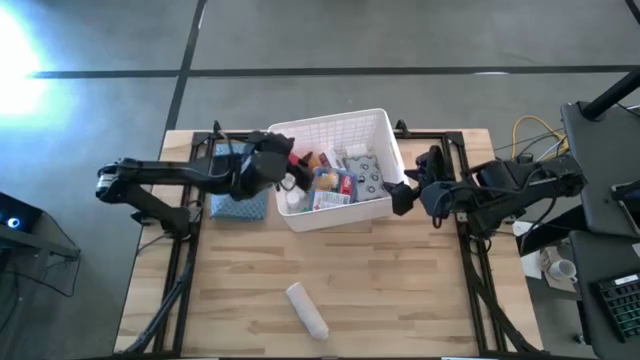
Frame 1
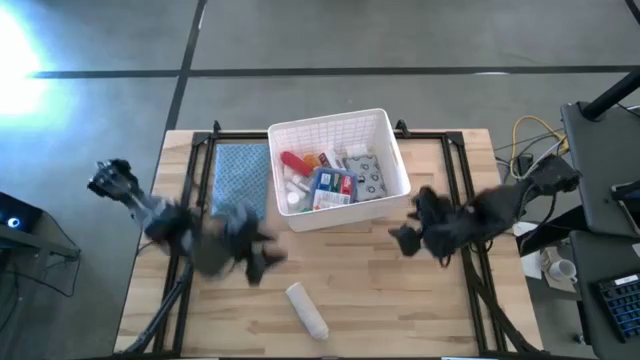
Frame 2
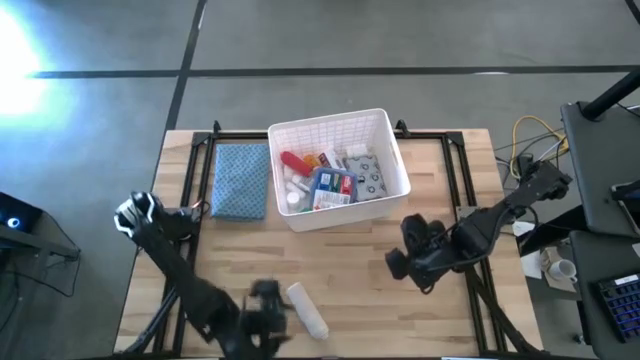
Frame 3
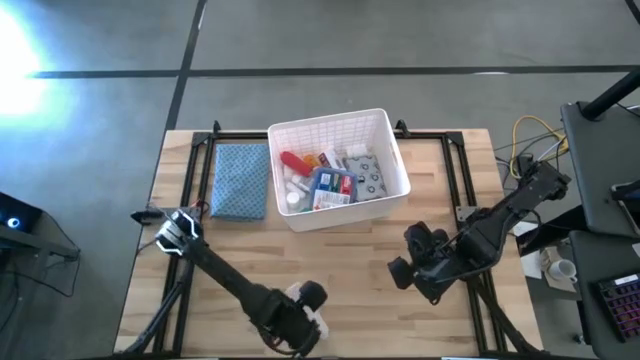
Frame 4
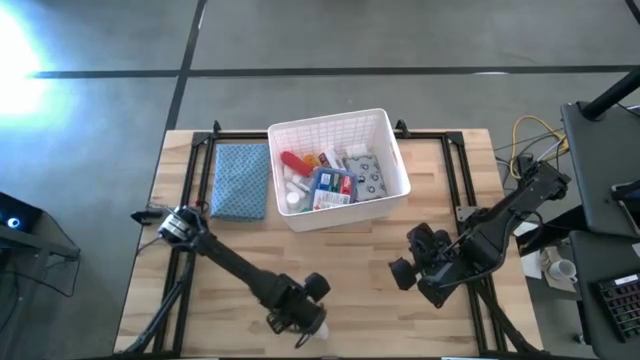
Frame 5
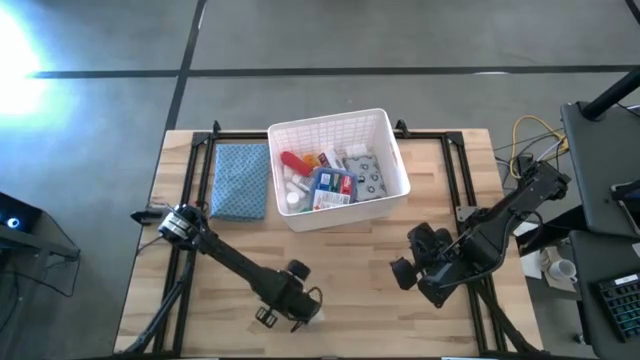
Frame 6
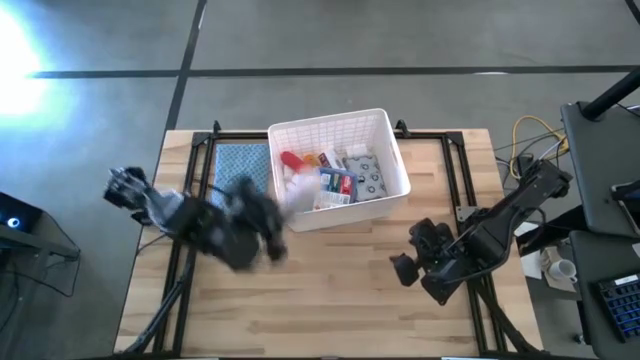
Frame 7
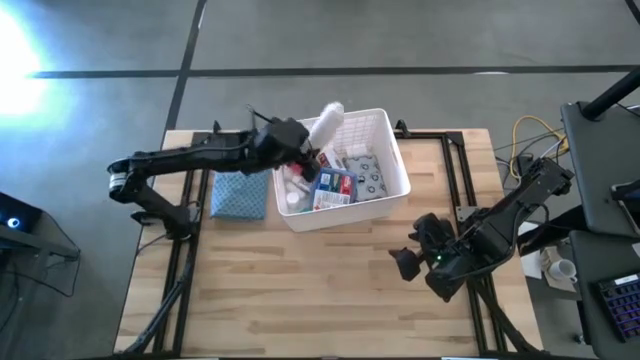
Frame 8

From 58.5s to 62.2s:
Task: Pick & place medical supplies in basket/bin
Put the white bandage into the white bin

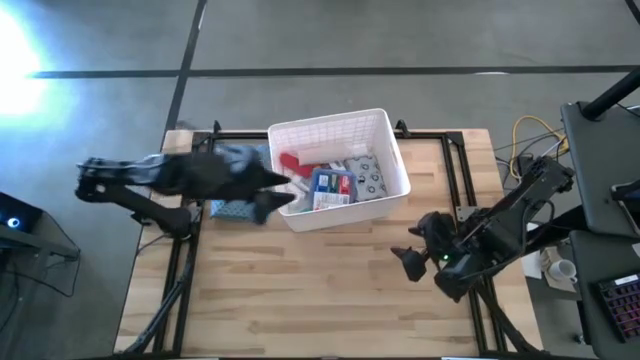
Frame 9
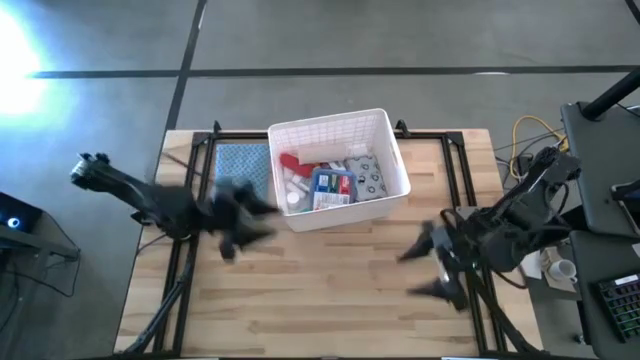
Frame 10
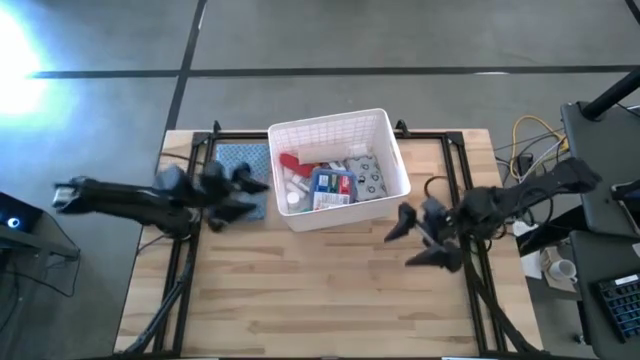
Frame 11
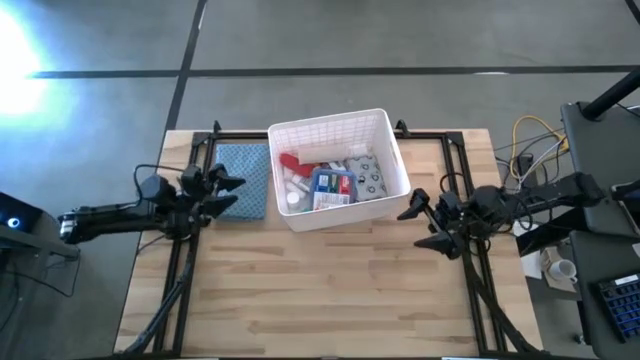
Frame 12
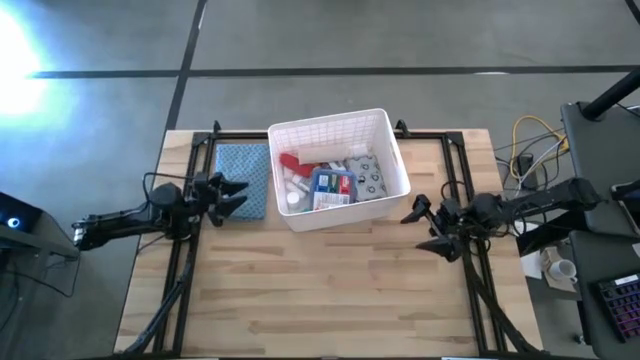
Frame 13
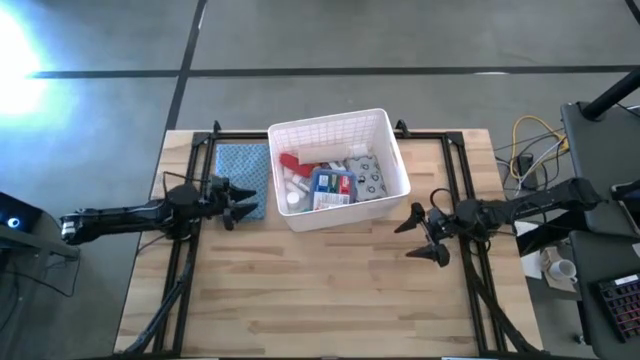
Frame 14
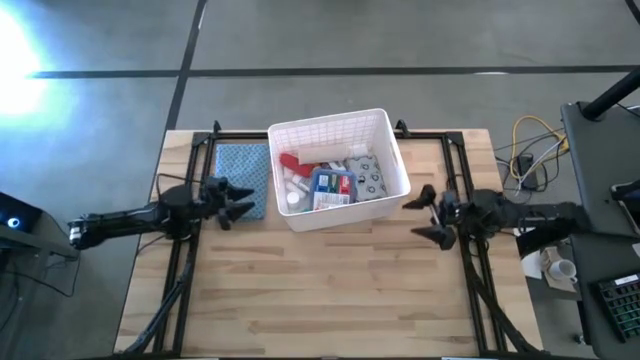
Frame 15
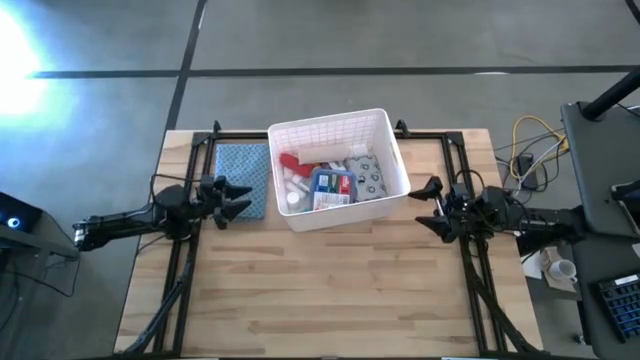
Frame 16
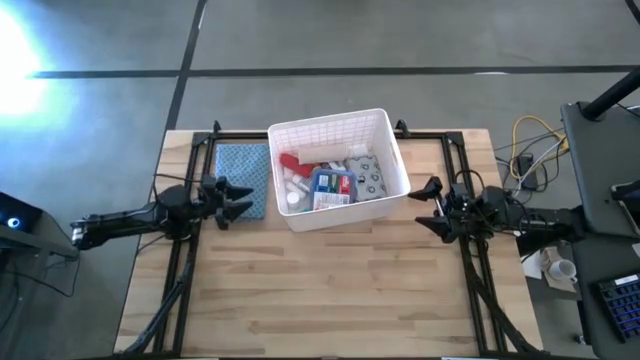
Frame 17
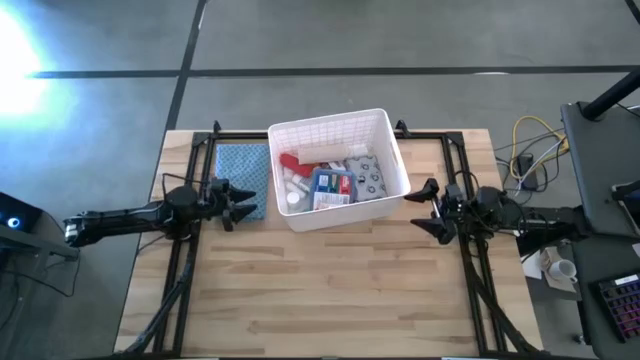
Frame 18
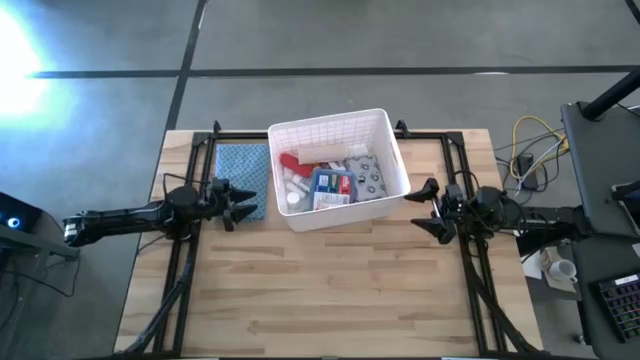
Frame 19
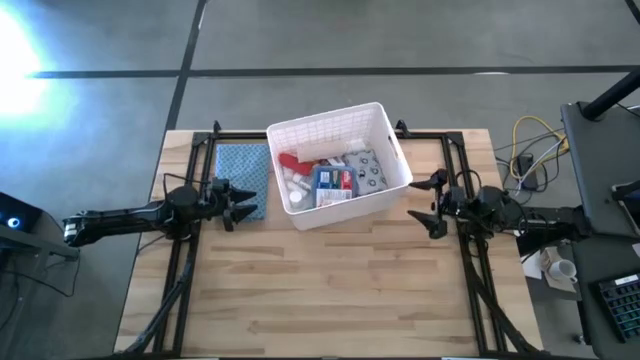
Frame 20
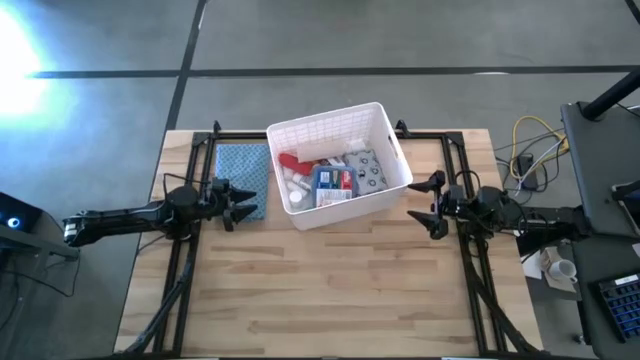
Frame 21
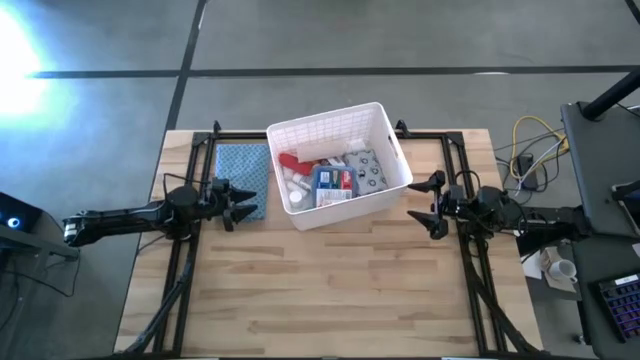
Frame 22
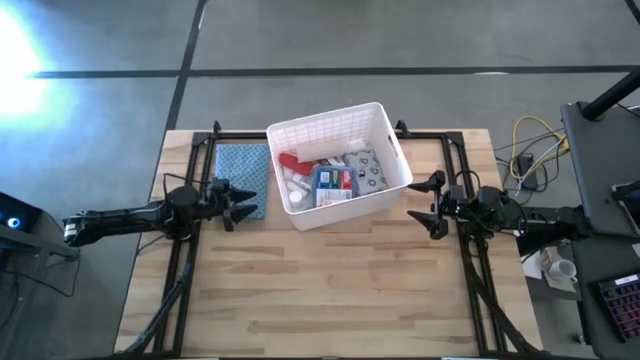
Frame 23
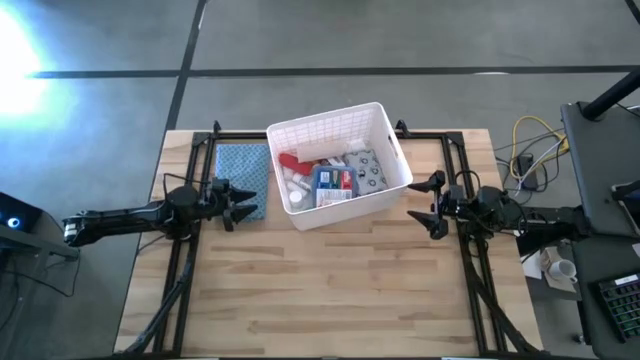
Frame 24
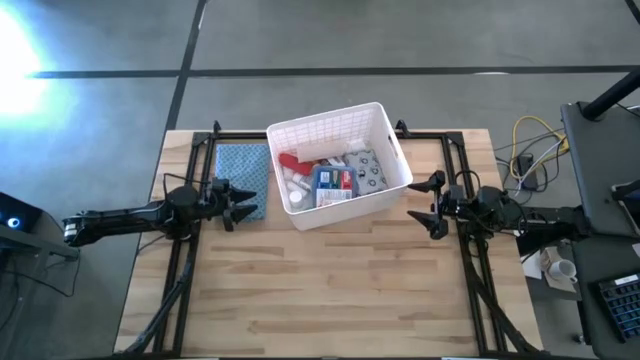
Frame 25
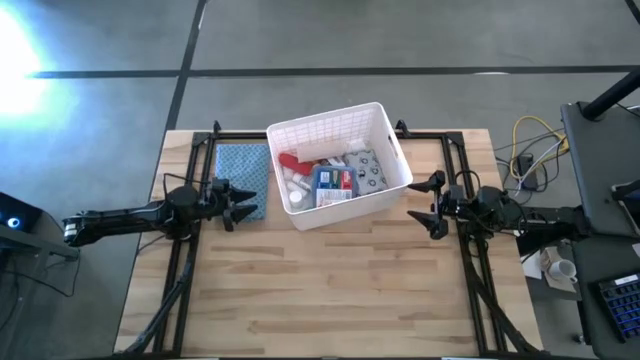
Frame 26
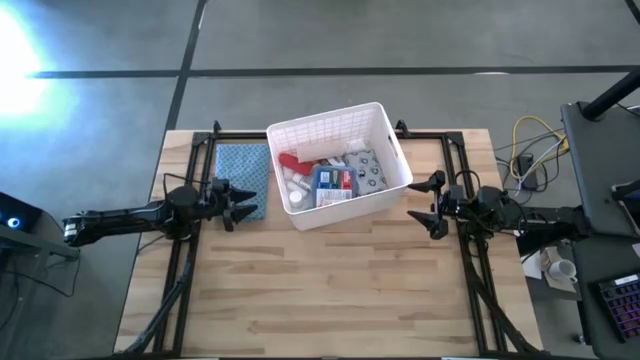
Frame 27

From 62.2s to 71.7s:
Return to Home Position

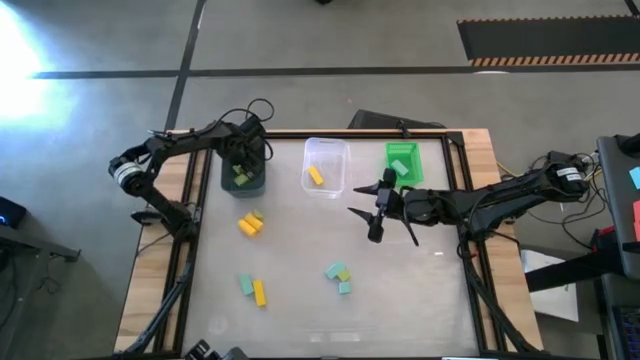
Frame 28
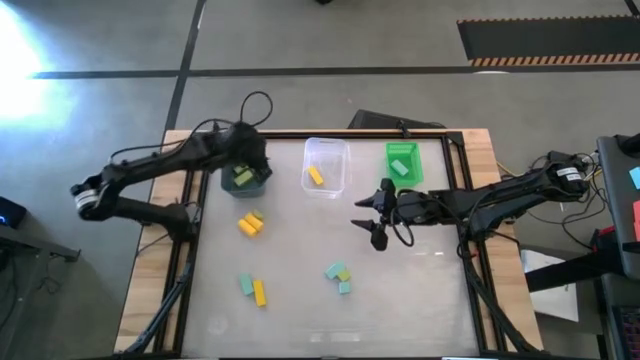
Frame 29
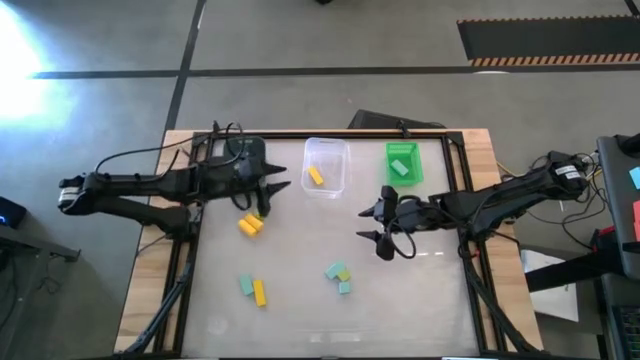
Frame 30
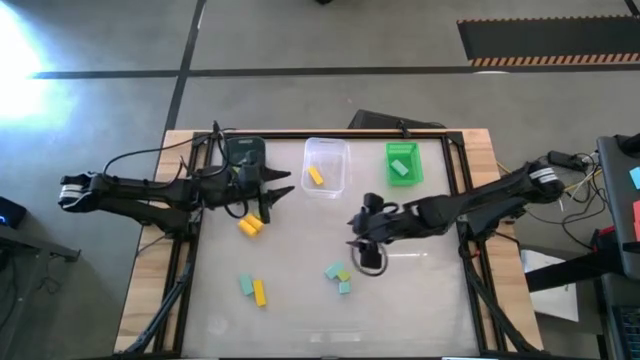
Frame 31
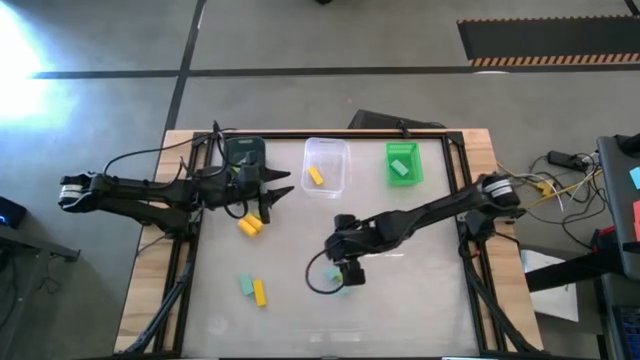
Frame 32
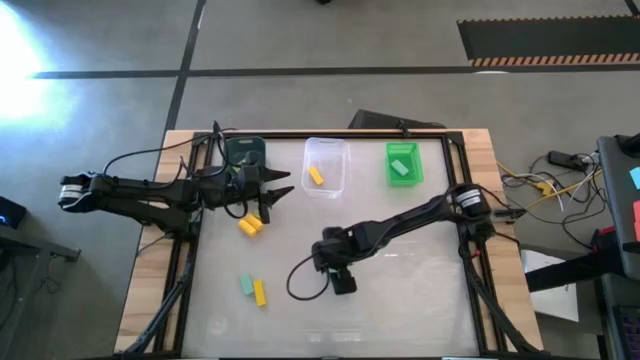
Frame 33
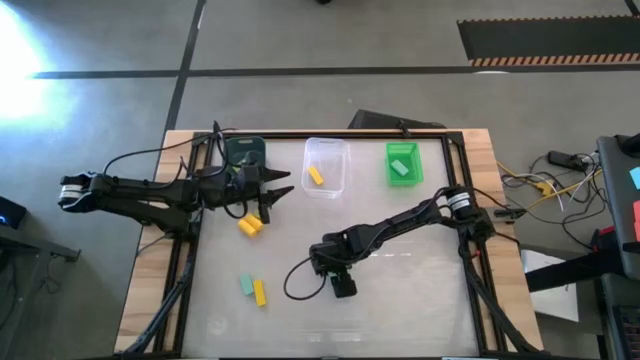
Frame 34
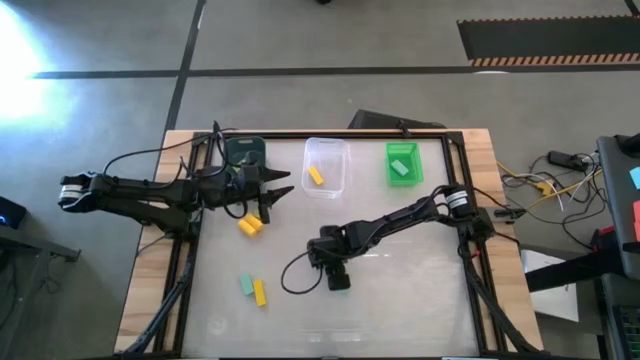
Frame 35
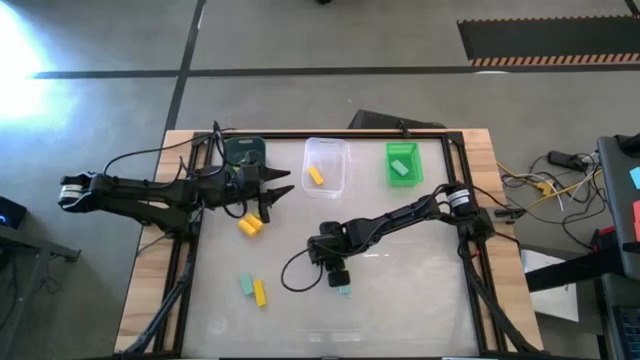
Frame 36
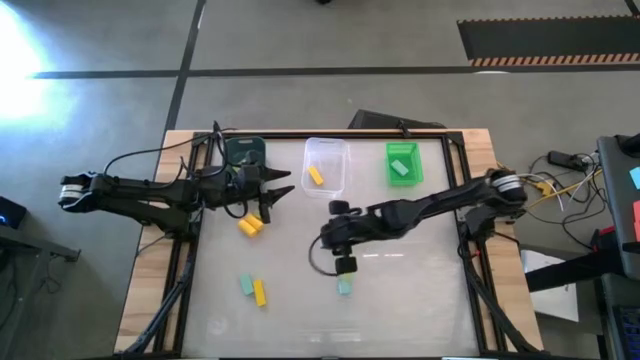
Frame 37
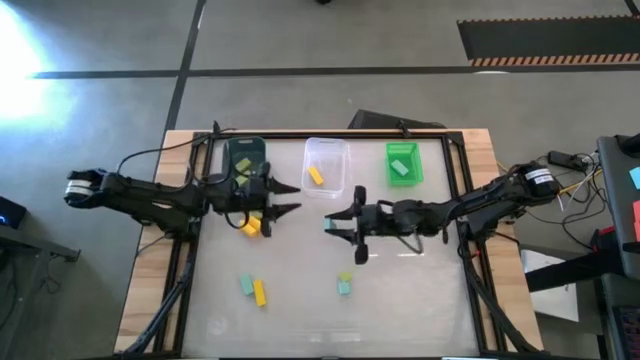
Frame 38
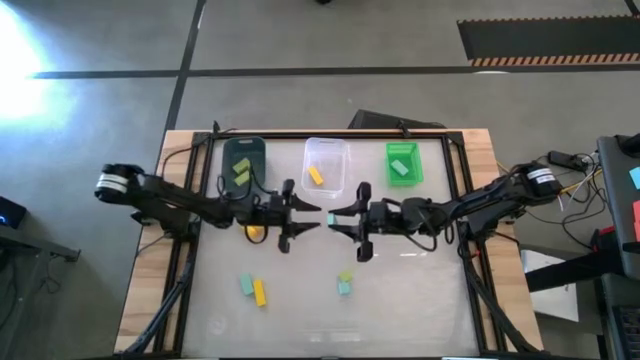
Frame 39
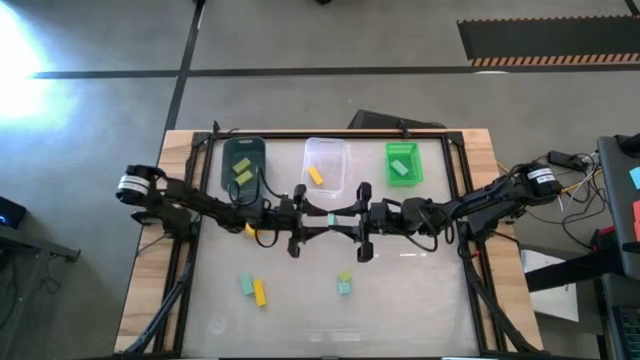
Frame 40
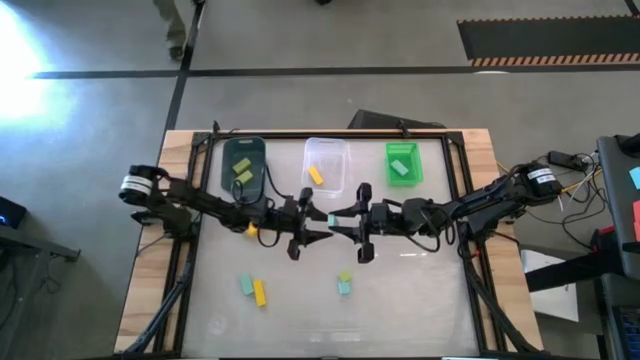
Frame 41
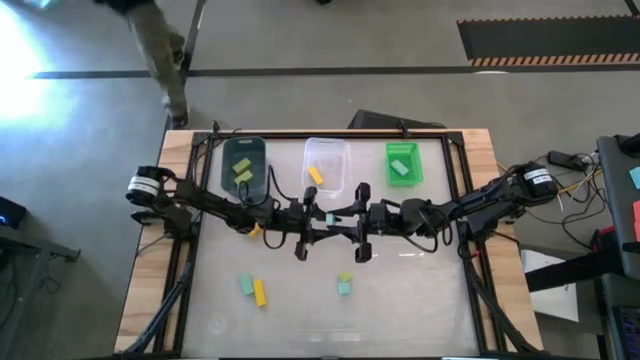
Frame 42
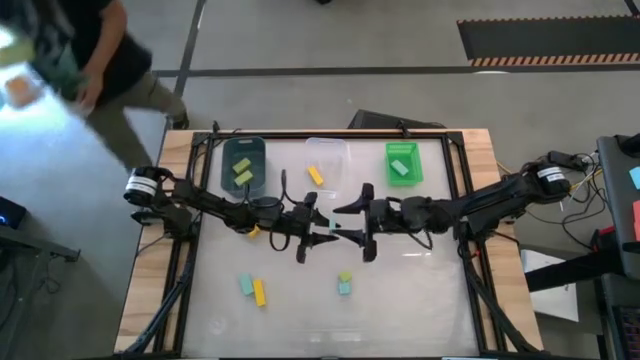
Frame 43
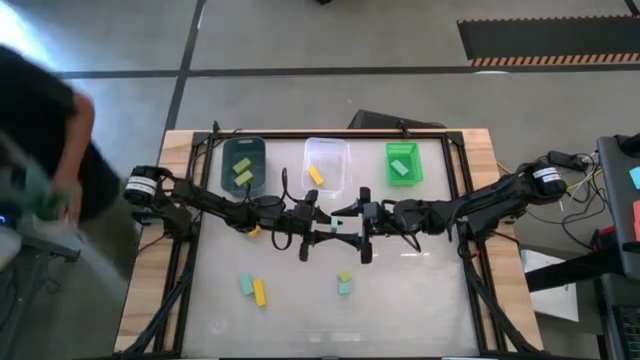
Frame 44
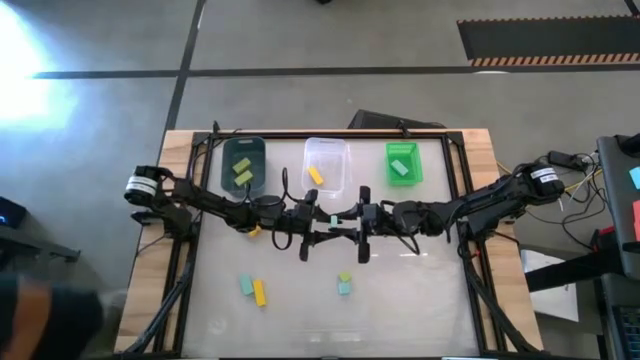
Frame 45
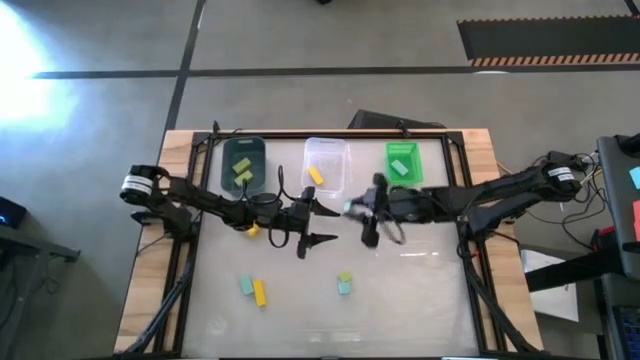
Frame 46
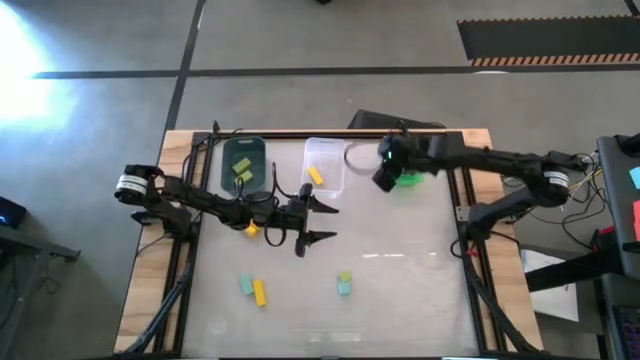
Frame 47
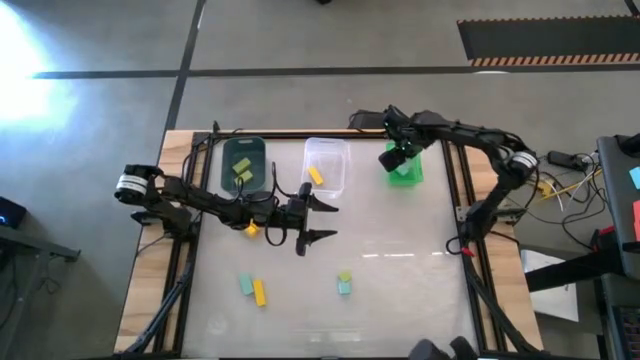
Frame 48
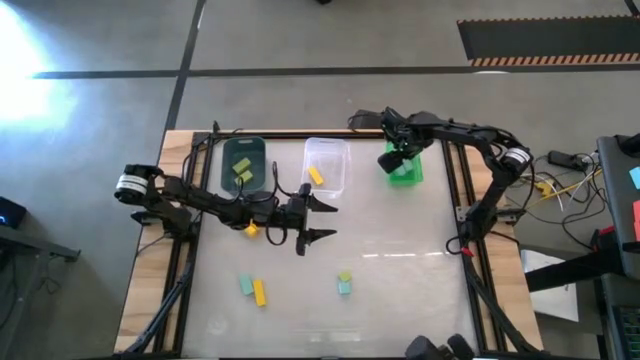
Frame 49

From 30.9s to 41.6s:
Task: Sort & place blocks by color
Put the blue block into the green bin
